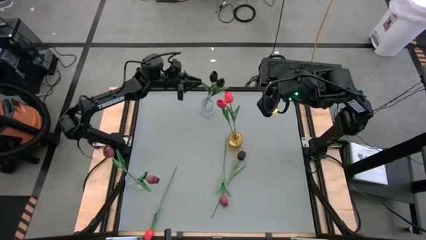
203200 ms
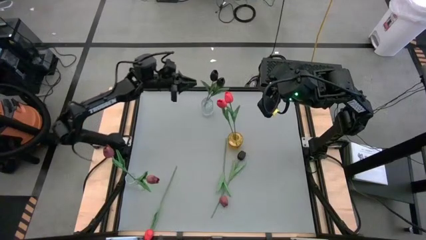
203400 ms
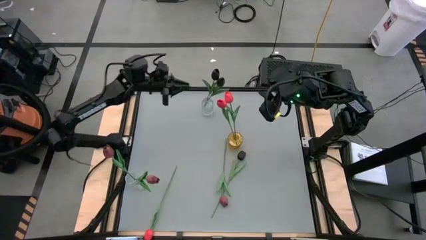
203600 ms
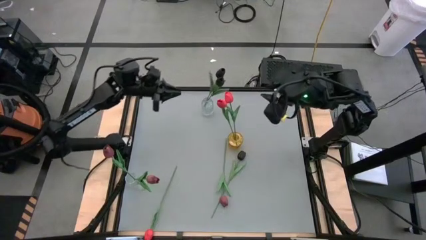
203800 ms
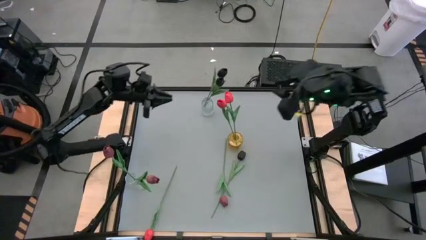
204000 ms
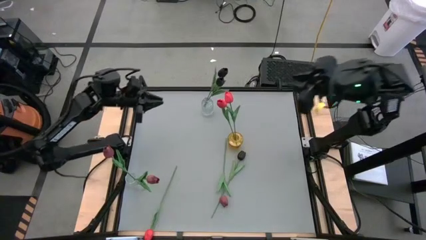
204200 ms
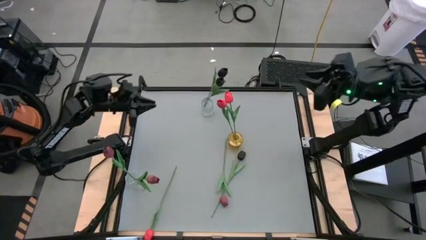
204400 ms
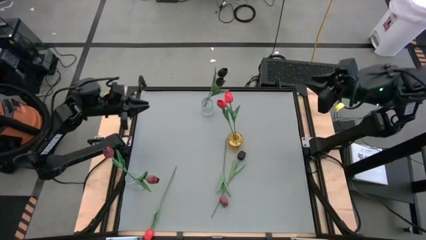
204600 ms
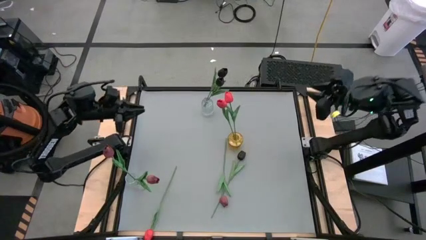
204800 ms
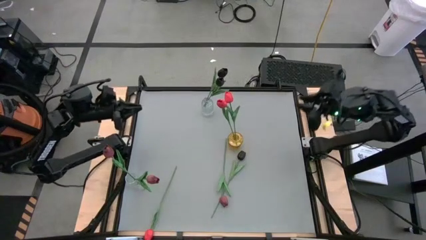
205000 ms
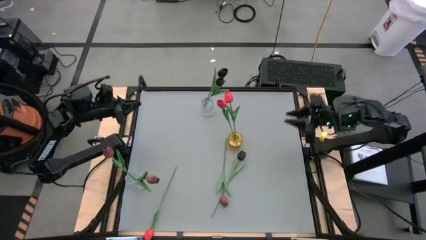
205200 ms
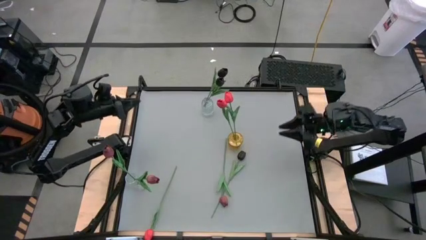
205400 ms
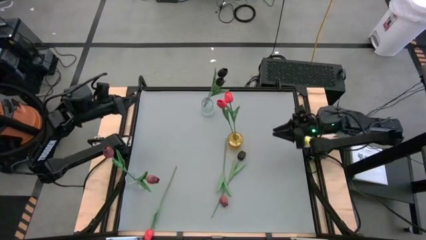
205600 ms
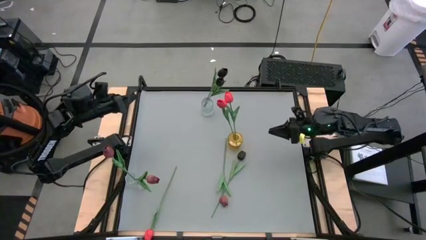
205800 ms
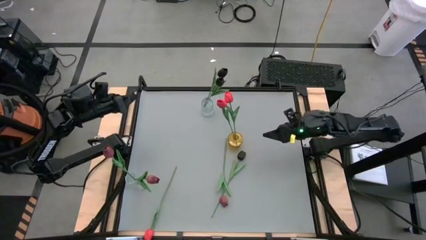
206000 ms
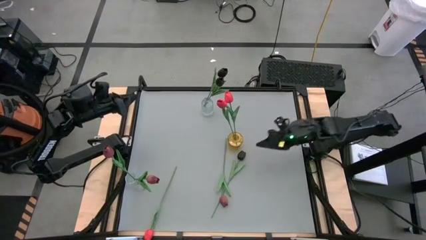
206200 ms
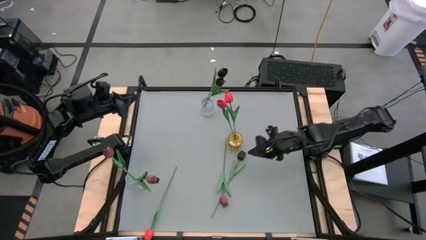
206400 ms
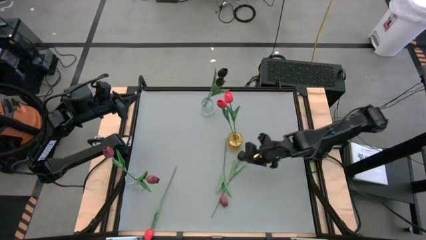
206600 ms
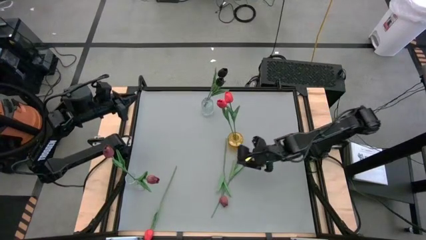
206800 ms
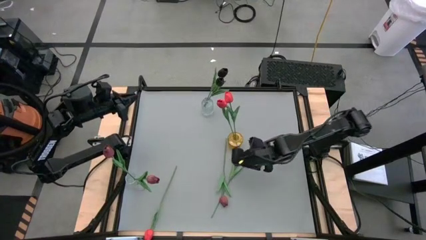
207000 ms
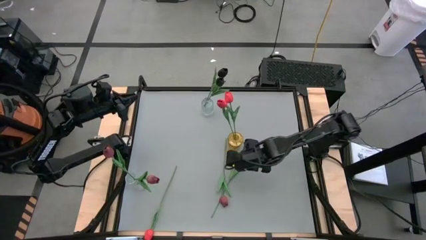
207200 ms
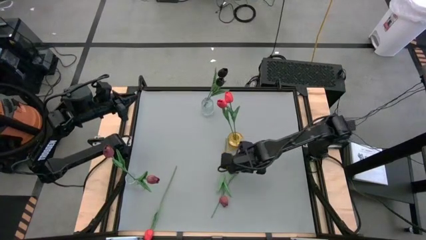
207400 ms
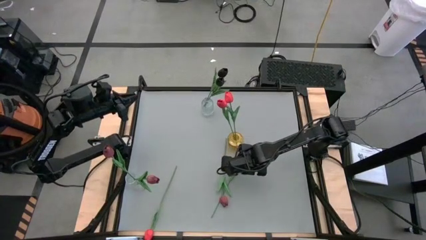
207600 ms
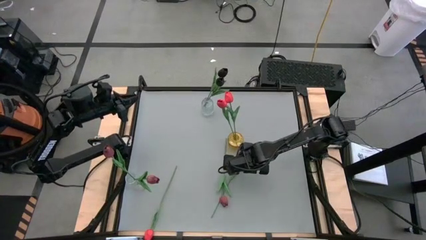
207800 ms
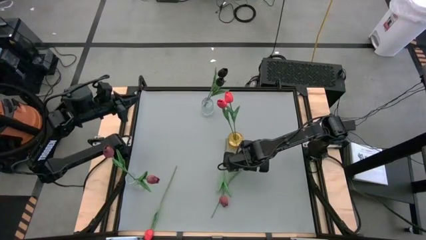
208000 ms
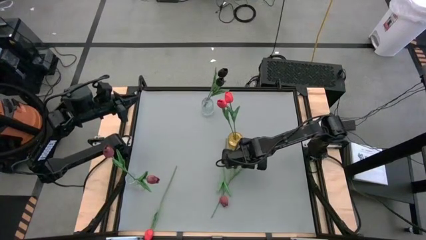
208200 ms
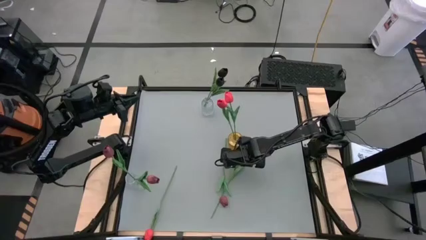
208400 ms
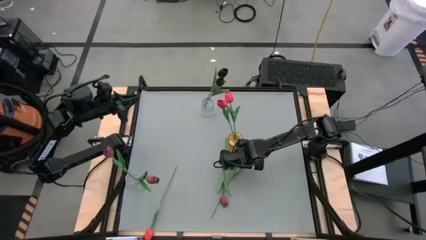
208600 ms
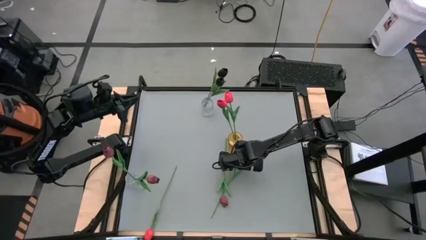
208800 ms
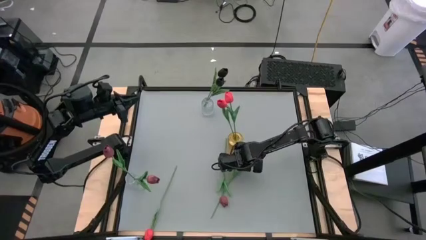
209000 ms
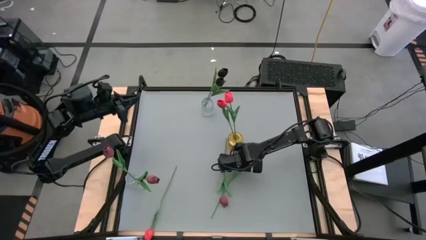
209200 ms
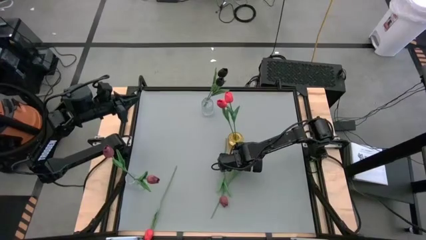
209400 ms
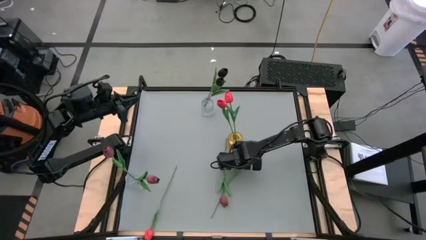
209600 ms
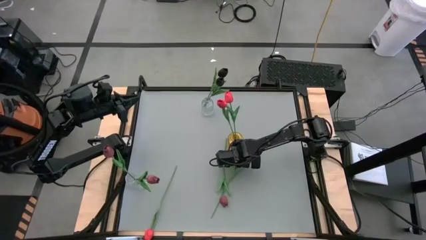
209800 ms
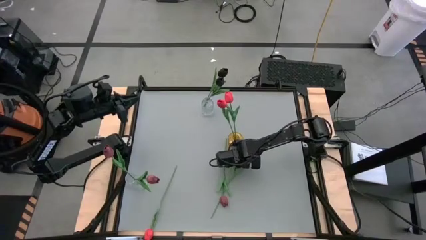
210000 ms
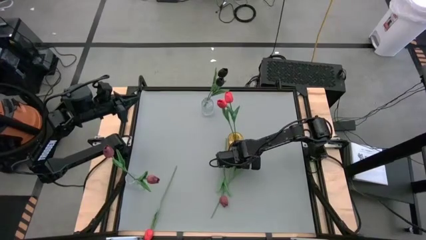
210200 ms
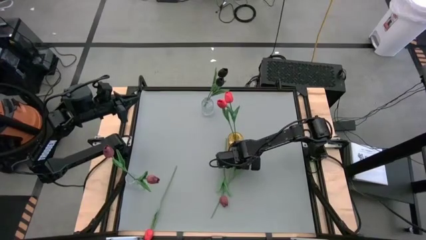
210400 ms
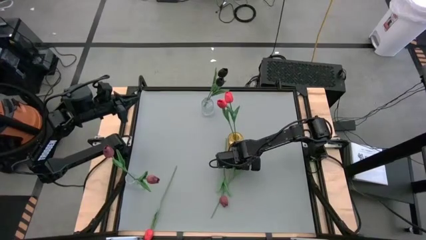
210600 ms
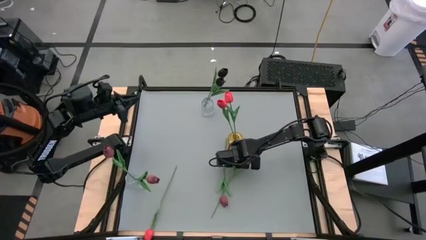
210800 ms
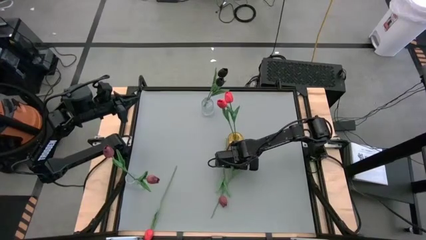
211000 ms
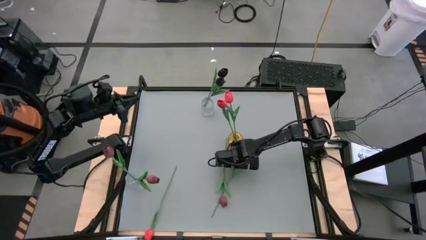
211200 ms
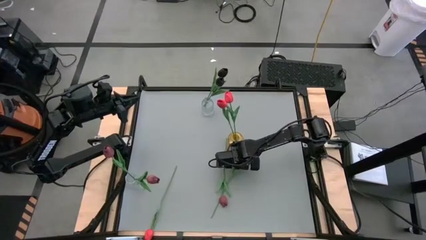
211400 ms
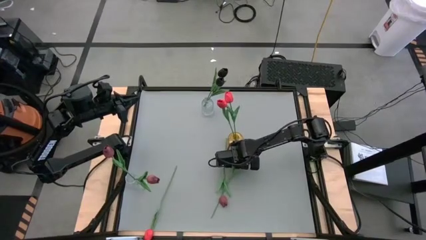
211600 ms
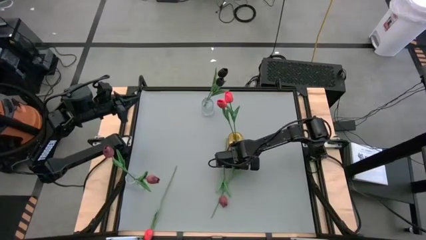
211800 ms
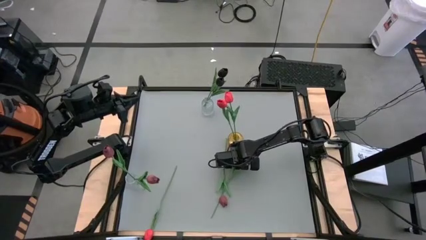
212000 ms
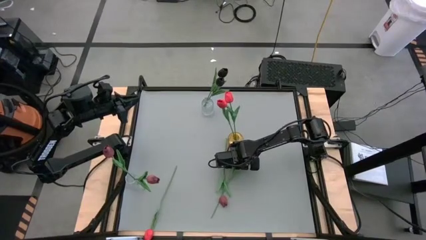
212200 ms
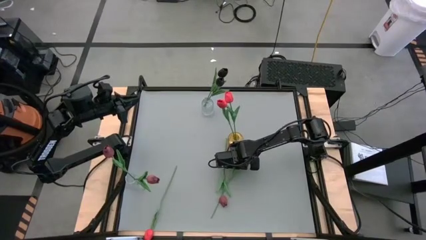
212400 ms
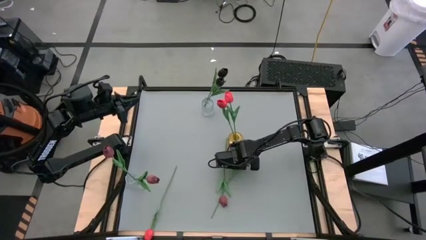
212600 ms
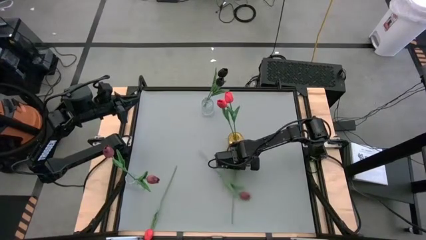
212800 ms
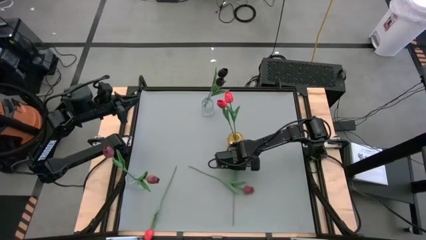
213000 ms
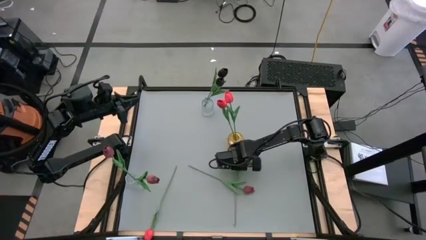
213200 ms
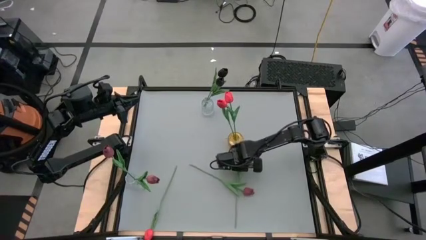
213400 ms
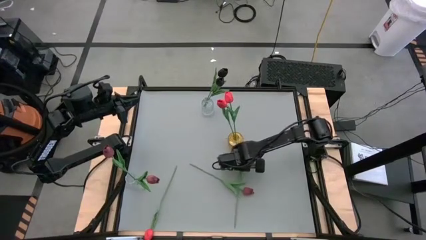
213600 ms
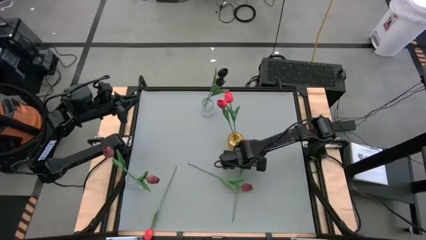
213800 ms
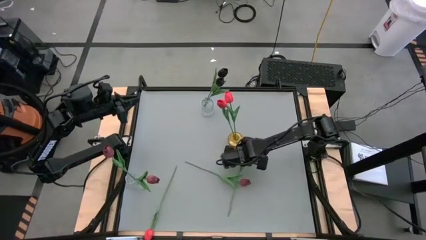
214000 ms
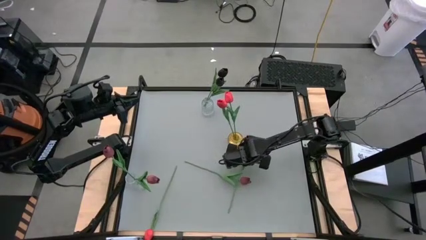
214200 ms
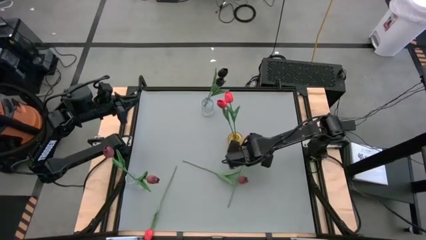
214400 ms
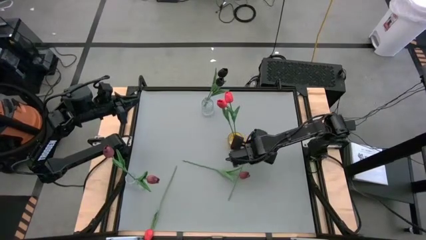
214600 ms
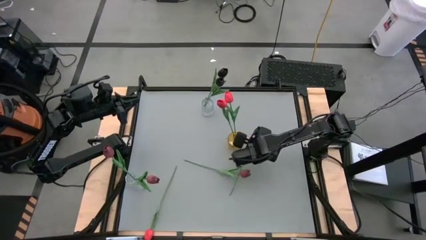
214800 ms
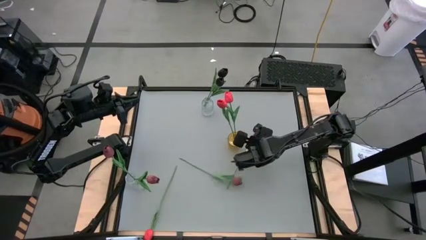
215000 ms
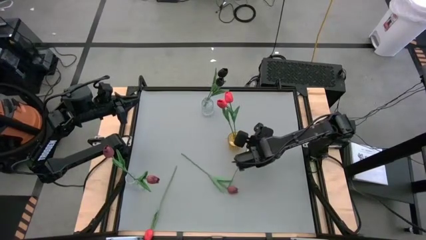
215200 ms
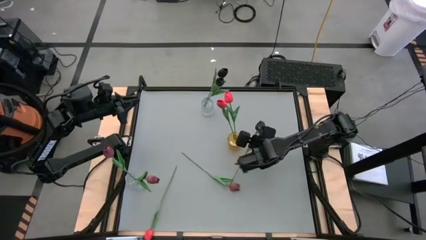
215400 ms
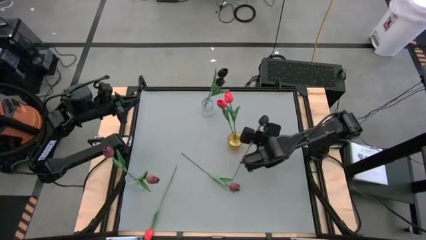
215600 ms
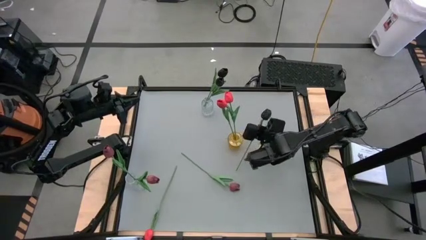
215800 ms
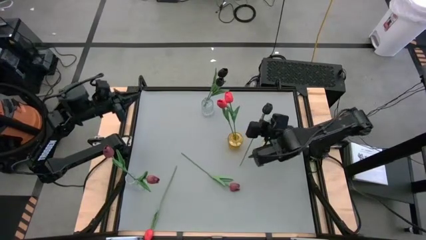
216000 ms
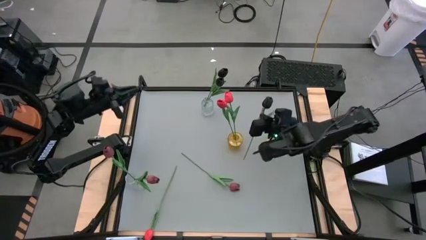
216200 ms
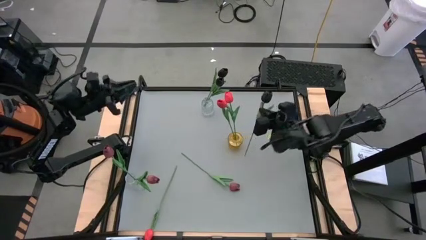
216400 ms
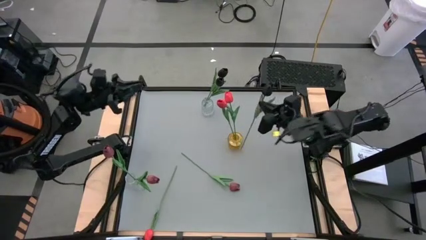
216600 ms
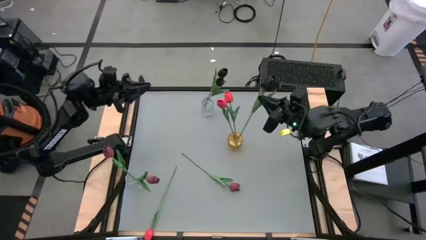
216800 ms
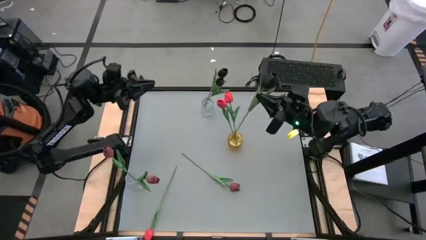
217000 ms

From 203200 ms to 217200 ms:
Task: Sort flowers into vase by color
Put the black tulip into the top transparent vase

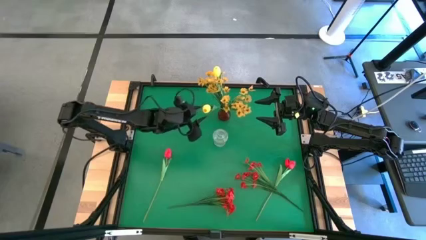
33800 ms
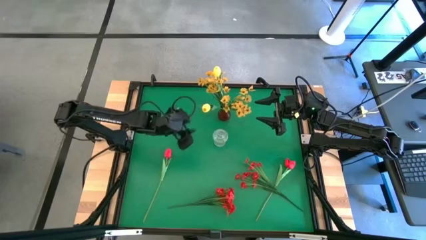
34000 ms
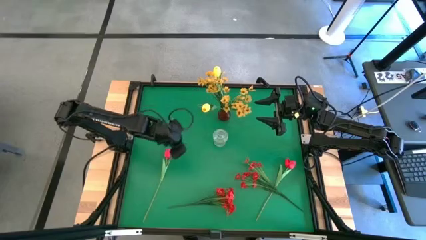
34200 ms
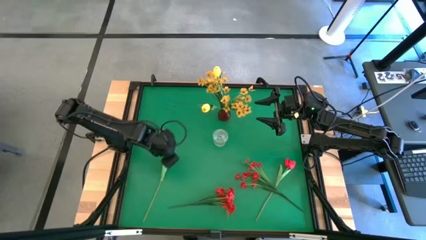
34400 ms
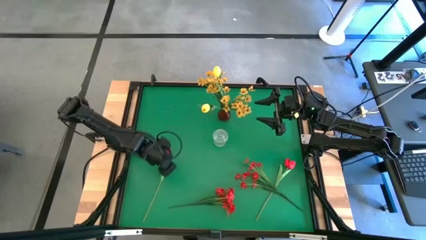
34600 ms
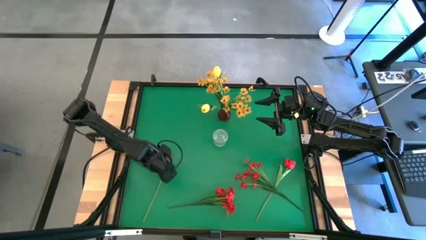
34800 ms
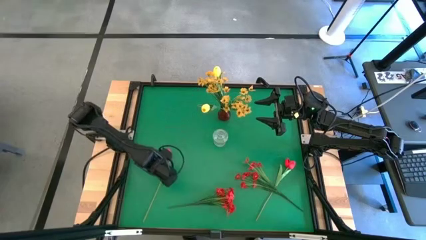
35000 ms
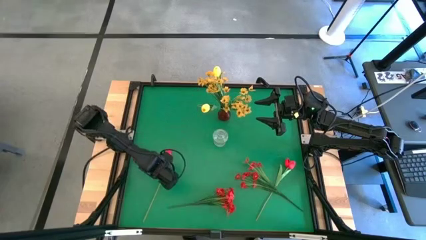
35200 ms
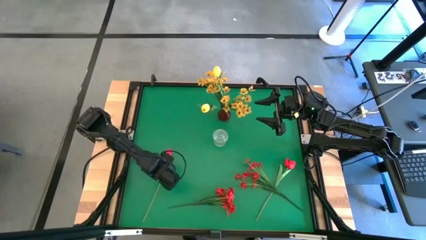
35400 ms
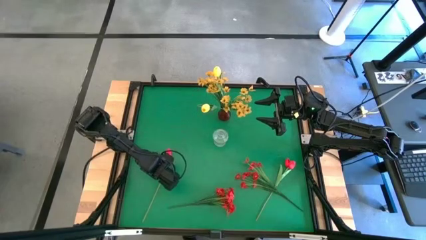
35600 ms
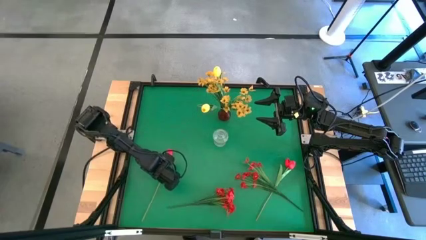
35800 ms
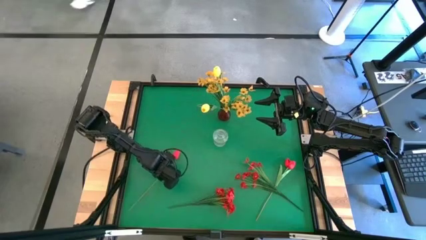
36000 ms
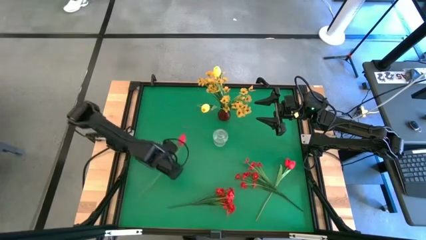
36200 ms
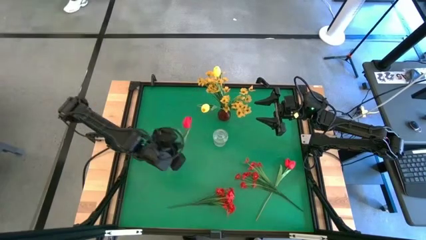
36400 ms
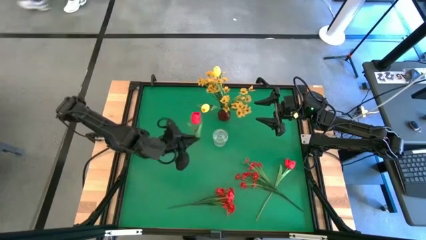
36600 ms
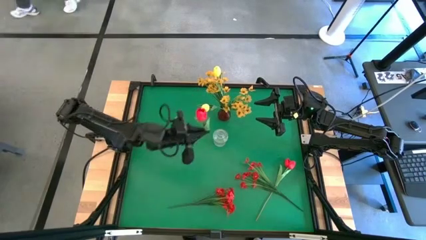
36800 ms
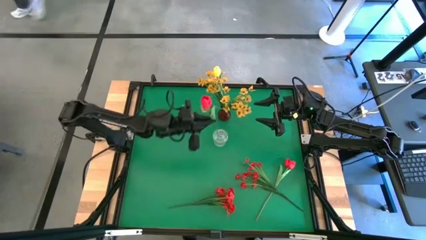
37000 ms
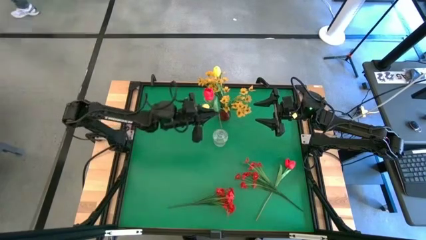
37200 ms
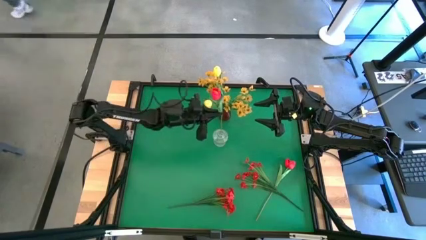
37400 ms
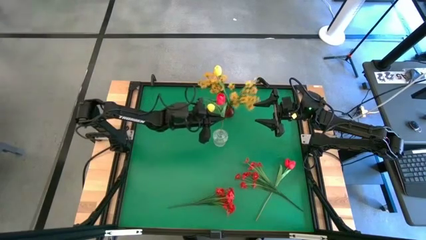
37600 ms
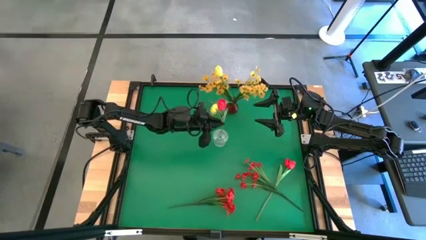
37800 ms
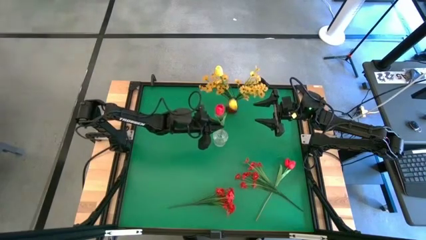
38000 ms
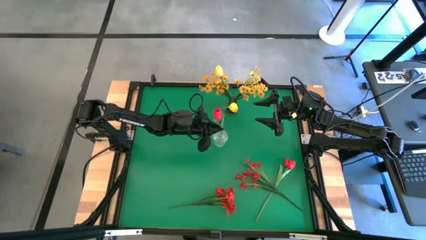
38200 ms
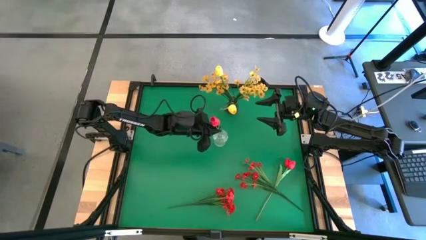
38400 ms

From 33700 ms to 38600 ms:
Task: Sort flowers into vase by color
Put the red tulip into the transparent vase
